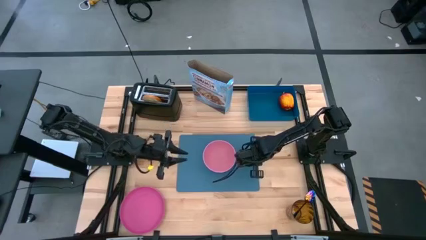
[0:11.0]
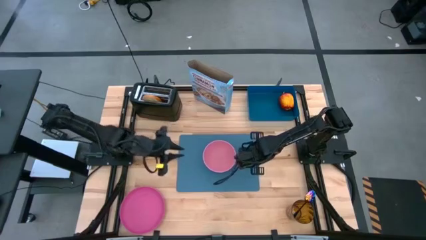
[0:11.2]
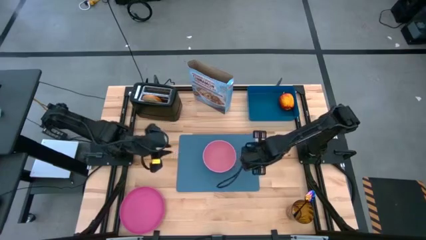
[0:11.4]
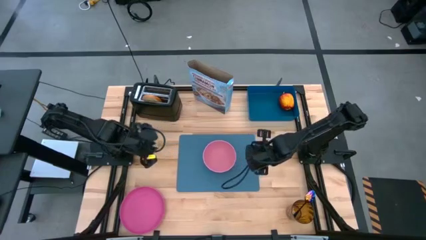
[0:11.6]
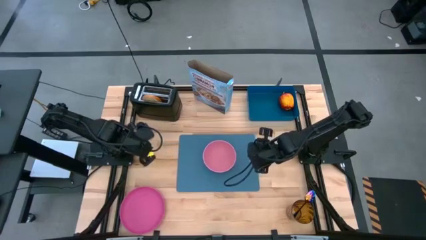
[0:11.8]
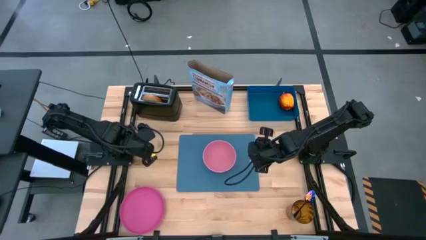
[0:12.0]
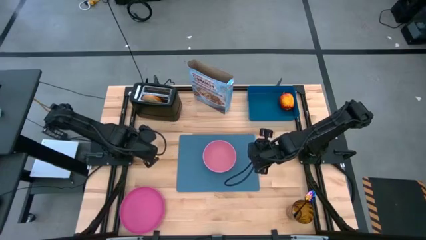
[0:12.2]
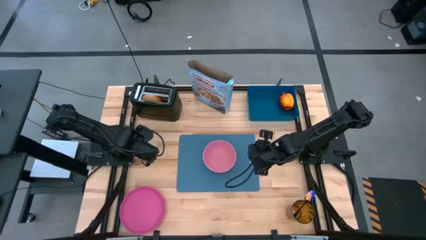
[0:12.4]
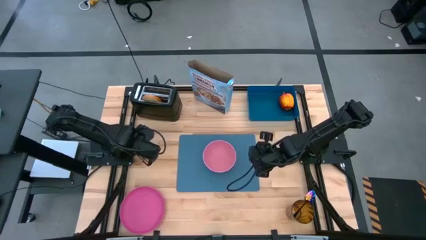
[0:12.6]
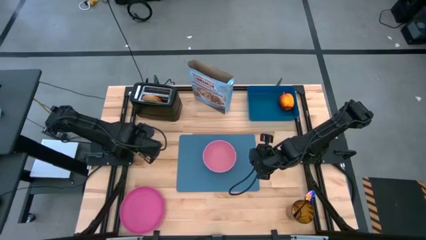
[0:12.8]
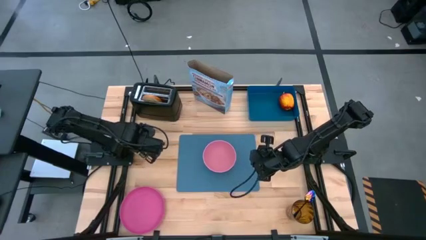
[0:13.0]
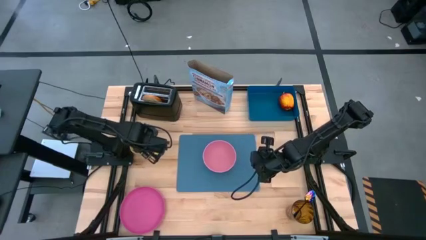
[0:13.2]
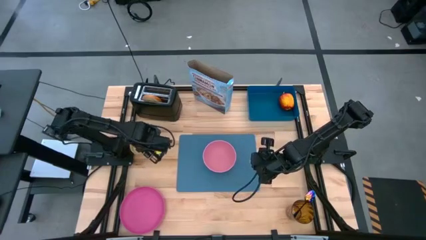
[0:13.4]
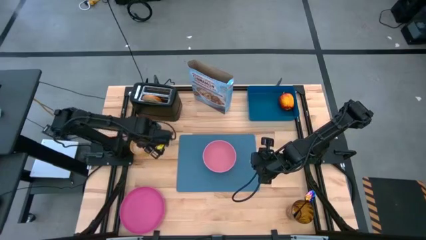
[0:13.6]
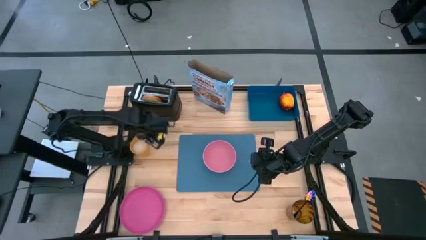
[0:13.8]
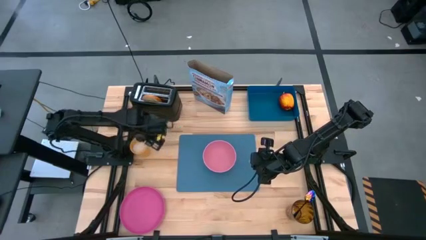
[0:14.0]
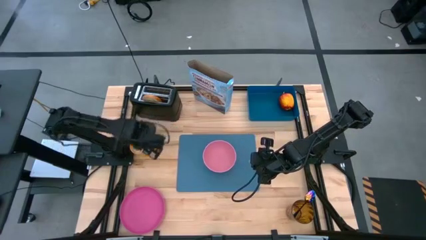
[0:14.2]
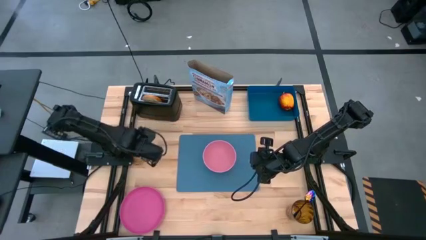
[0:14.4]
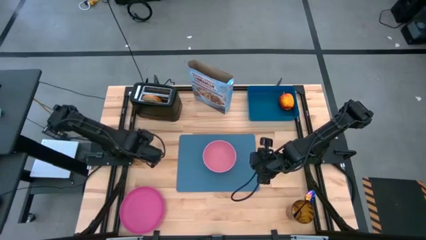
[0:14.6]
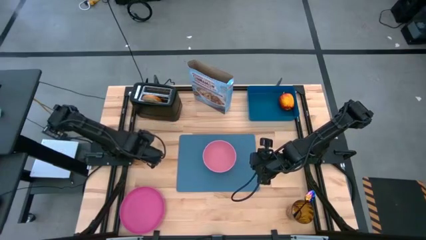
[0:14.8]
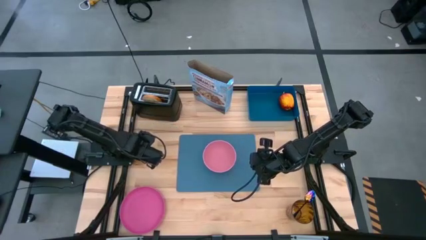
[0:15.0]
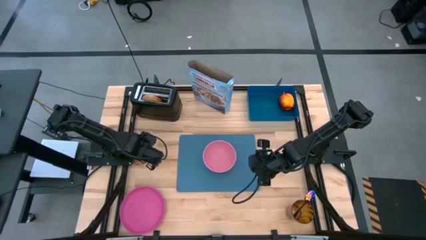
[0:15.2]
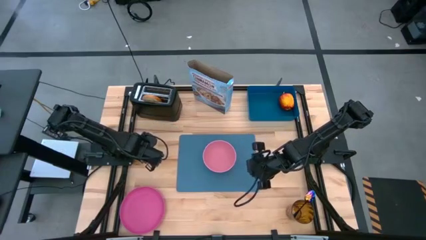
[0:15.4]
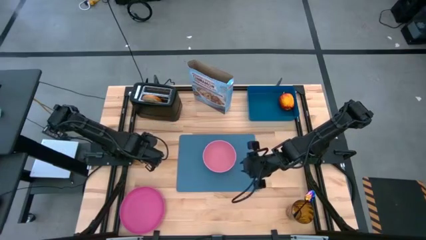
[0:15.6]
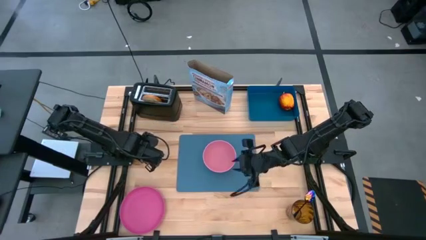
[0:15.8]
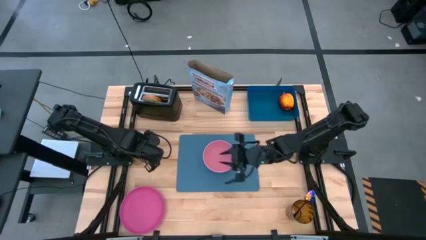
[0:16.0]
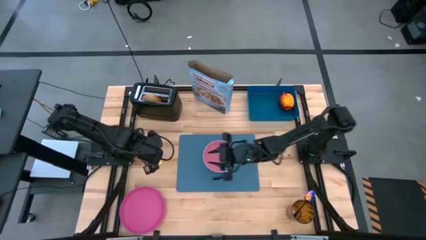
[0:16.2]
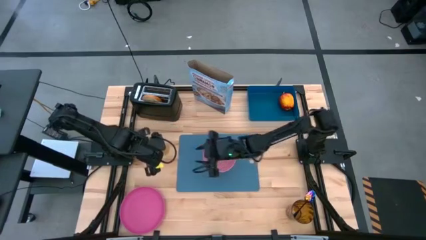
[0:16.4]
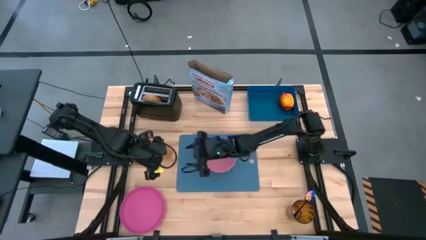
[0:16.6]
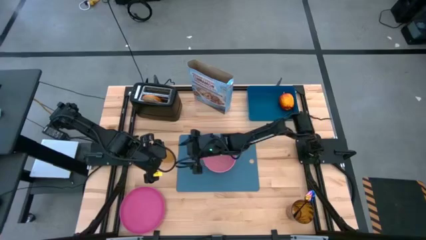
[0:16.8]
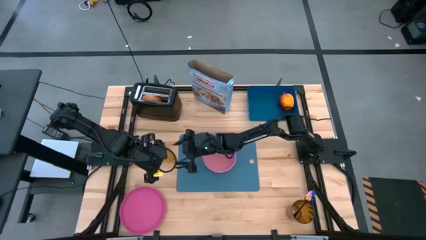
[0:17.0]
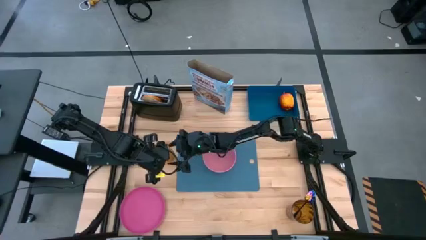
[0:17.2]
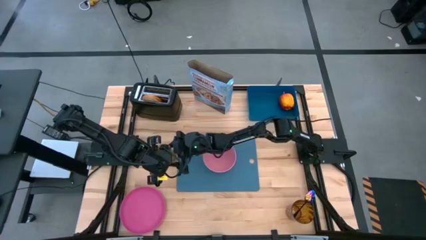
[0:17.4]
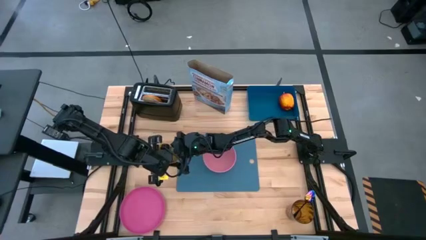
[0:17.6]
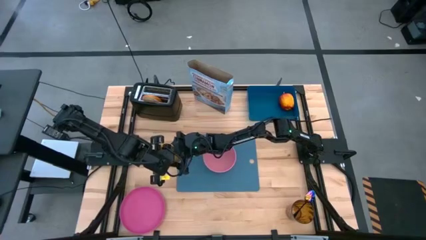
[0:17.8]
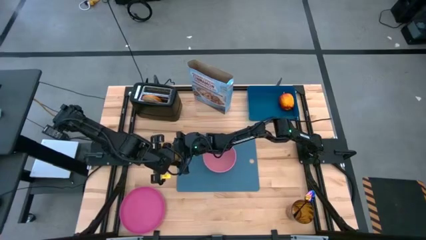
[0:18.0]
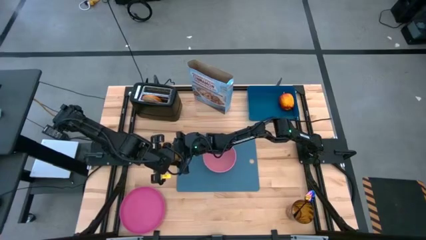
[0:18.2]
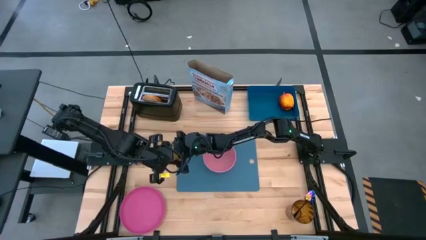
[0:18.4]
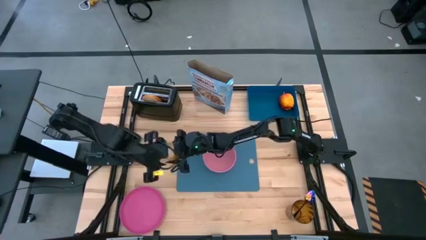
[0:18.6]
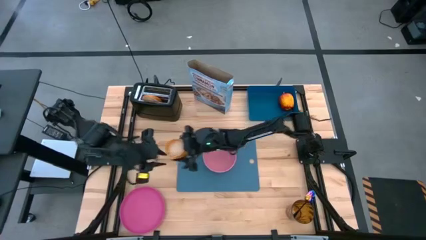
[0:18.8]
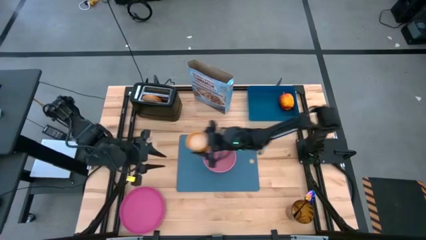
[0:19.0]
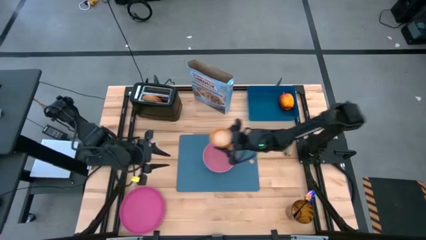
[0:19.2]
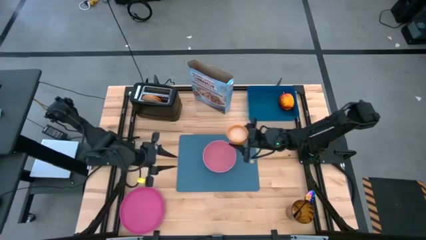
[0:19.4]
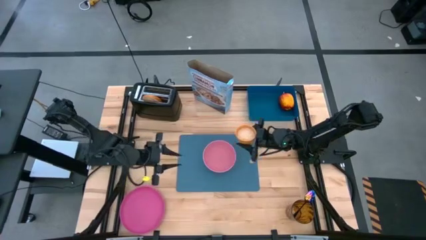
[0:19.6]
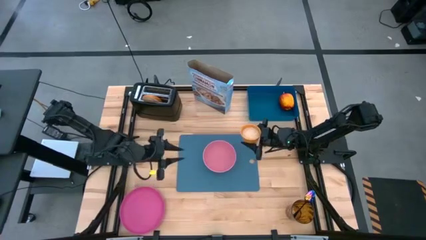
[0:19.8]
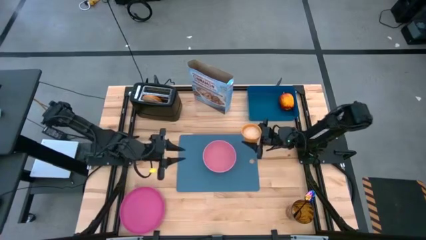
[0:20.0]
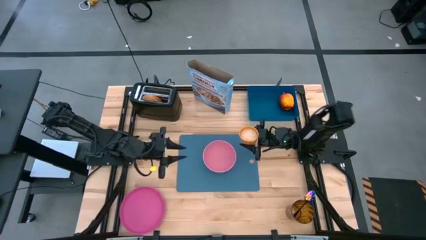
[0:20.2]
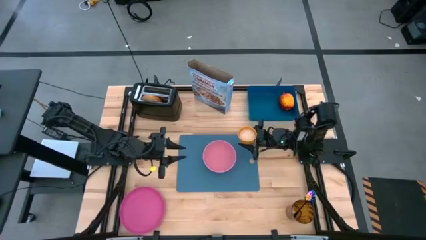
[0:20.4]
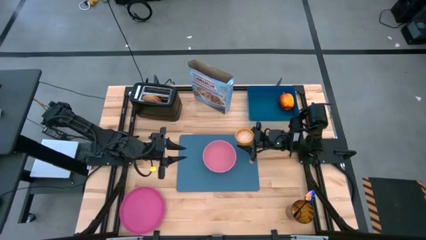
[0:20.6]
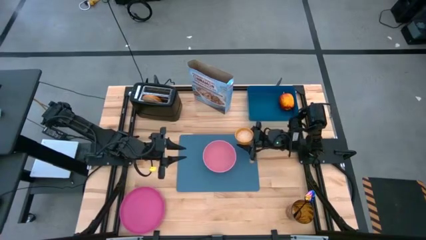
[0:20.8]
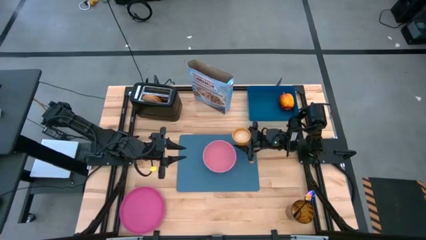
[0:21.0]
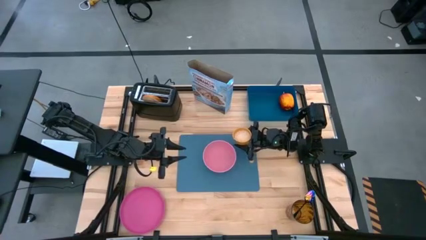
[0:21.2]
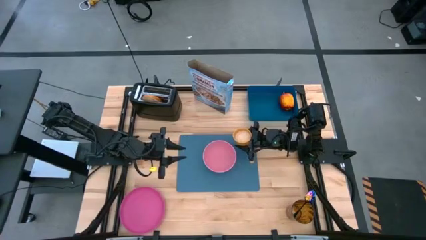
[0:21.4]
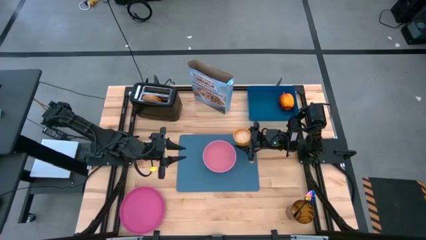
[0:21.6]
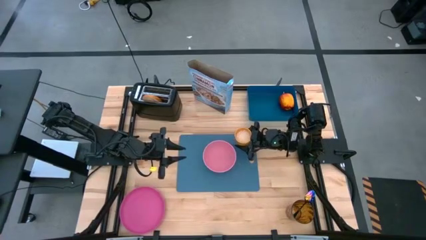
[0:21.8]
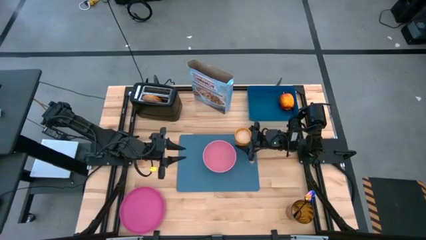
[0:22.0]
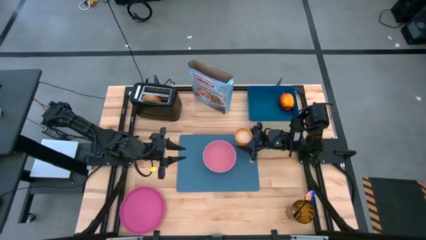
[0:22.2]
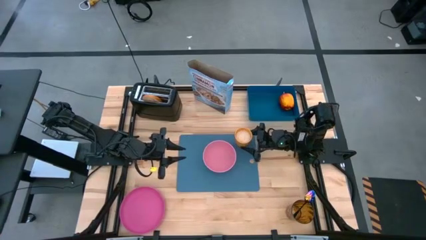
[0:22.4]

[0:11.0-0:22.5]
Task: Arrange a breakfast setting
Put the yellow cup of milk on the blue cutting board to the top right of the pink bowl

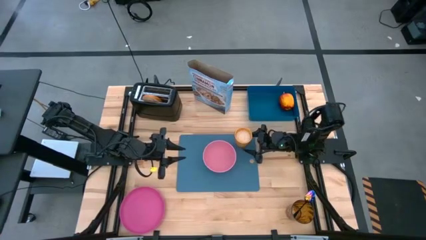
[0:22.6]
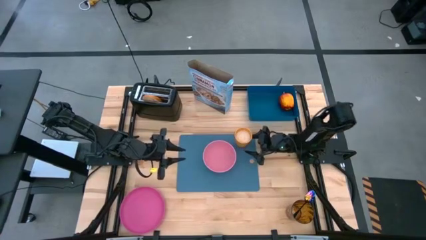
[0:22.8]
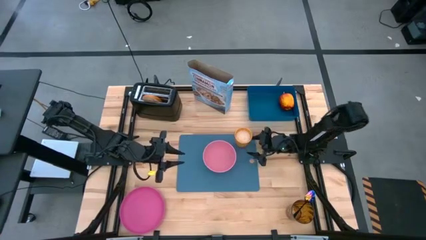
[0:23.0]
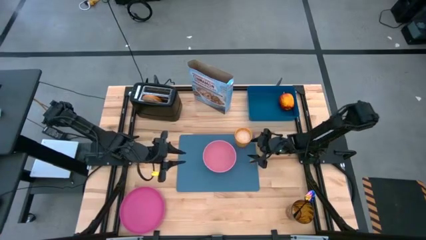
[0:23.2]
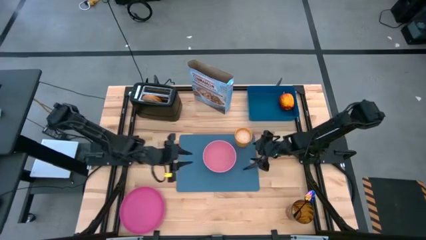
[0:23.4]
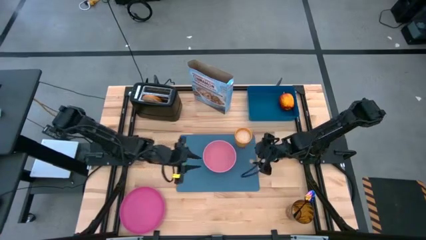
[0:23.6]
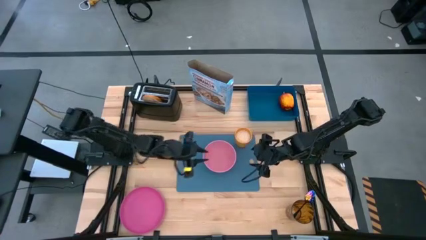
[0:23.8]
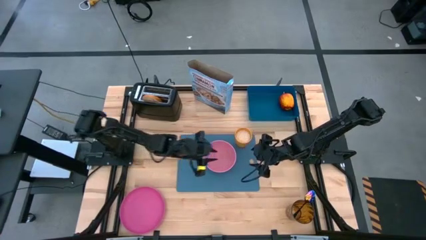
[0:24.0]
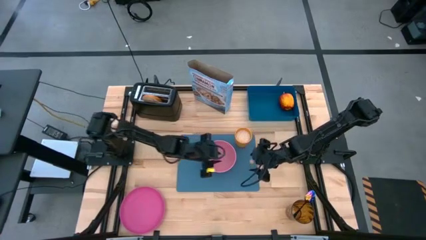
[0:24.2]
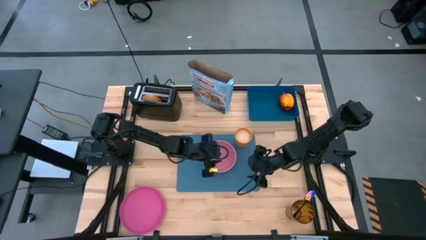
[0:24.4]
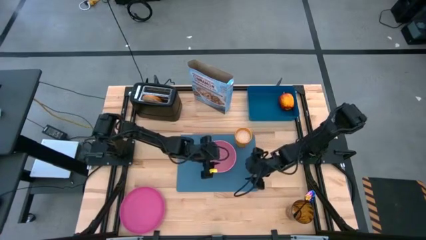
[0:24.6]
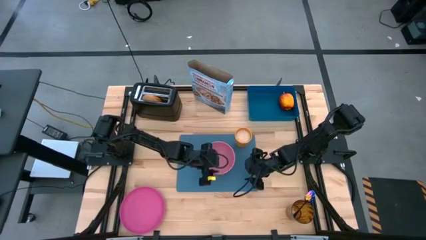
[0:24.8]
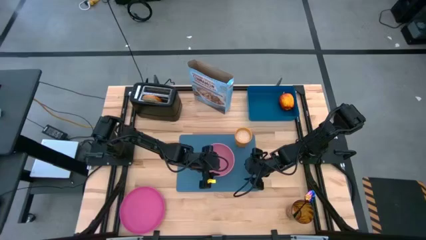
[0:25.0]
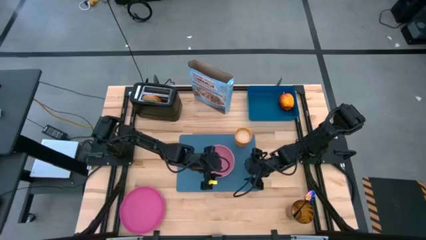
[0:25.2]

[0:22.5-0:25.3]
Adjust the pink bowl on the blue cutting board

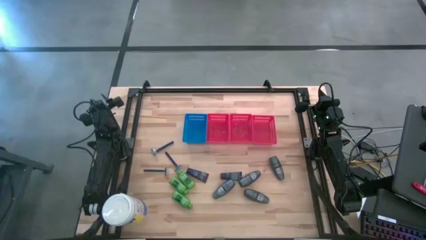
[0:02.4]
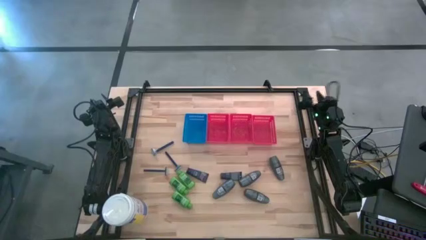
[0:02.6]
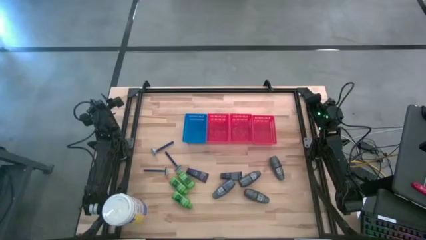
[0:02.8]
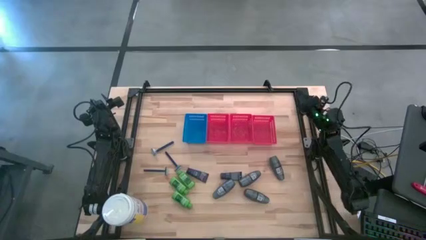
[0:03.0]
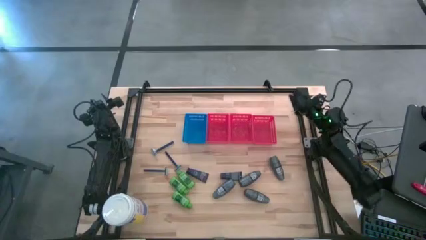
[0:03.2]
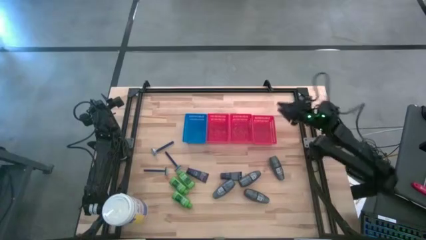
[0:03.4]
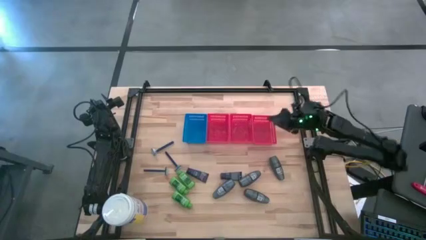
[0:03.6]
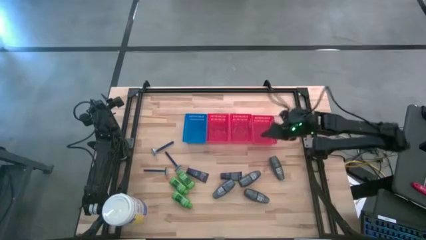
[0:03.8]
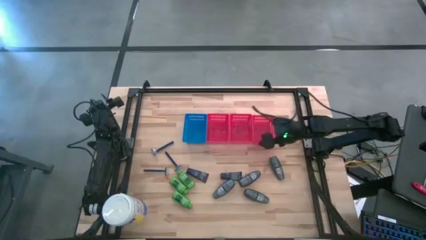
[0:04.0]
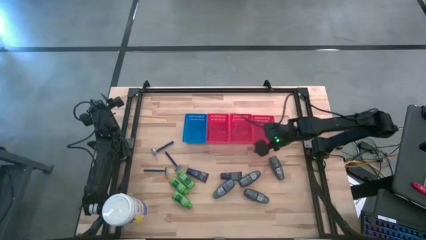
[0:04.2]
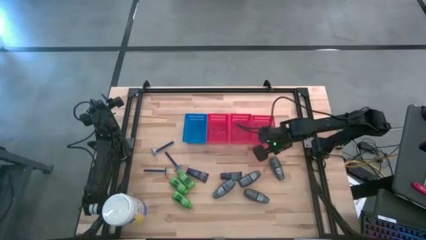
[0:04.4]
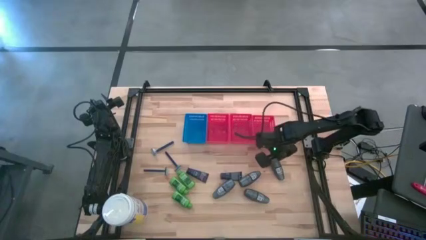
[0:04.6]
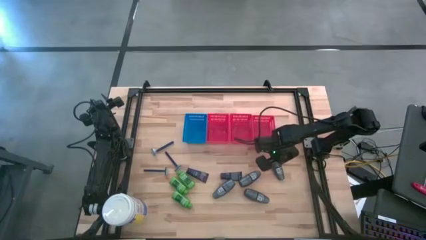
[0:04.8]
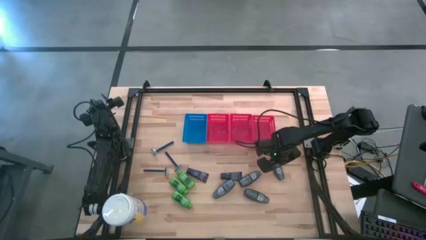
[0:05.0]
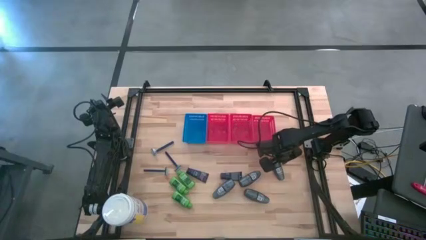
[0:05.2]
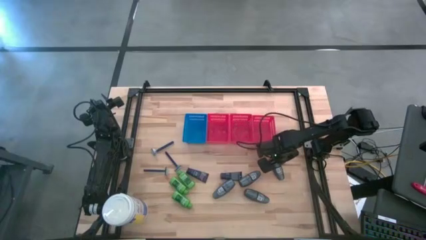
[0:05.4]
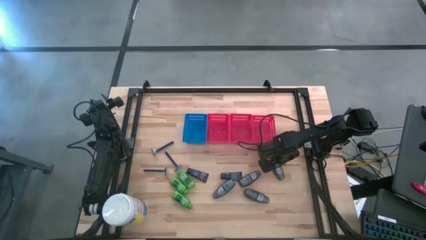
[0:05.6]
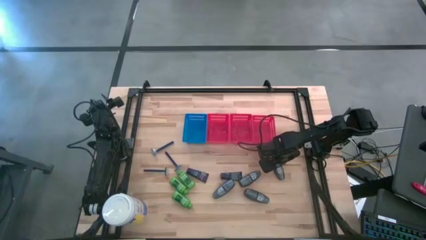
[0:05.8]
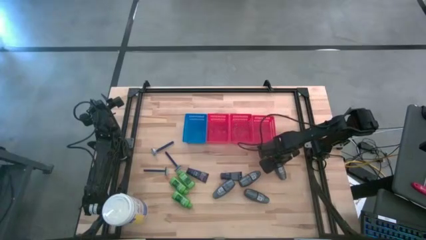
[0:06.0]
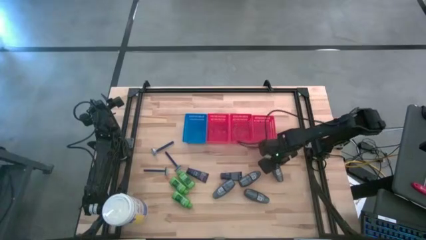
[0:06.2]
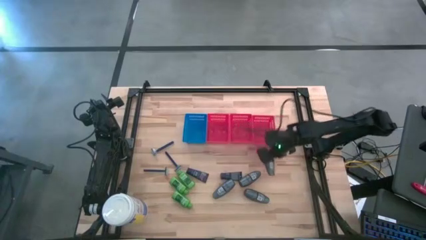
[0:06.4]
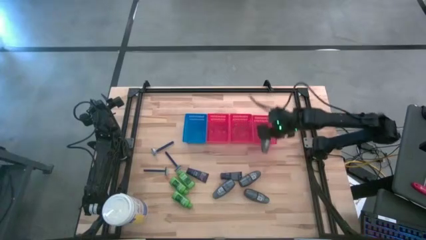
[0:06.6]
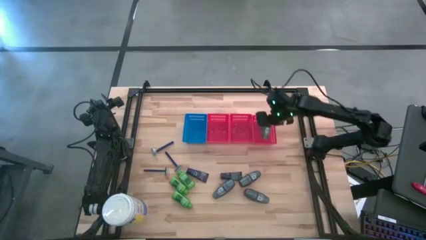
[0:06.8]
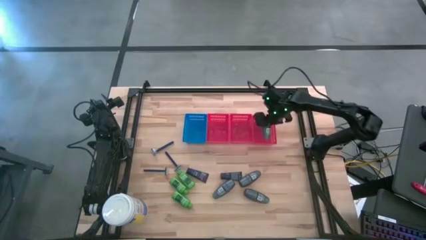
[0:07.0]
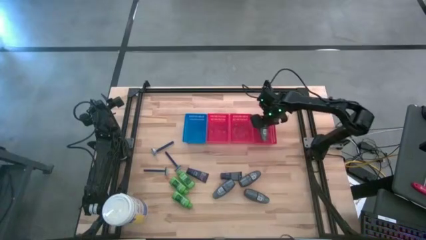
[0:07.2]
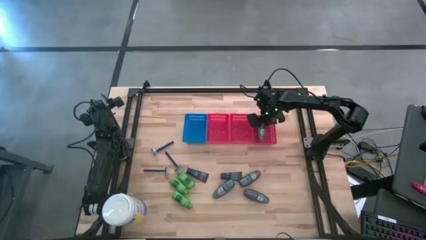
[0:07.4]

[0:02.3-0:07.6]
Task: Pick & Place Travel size toiletries
Put the gray deodorant into the right red bin
